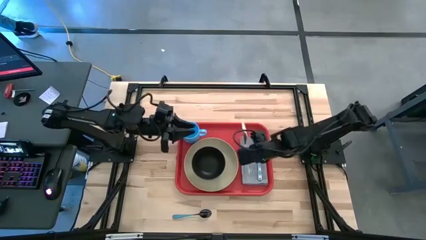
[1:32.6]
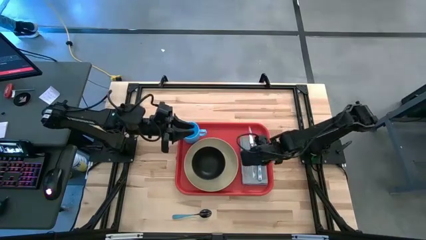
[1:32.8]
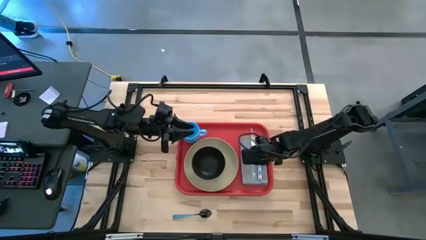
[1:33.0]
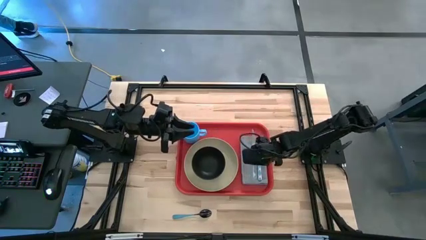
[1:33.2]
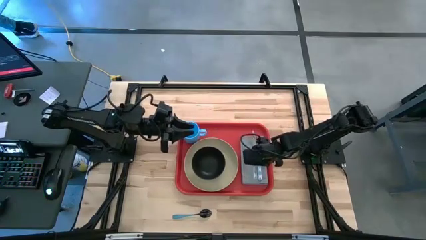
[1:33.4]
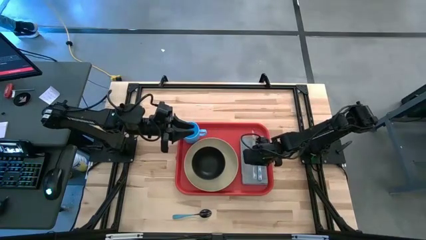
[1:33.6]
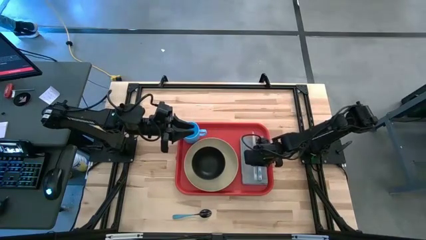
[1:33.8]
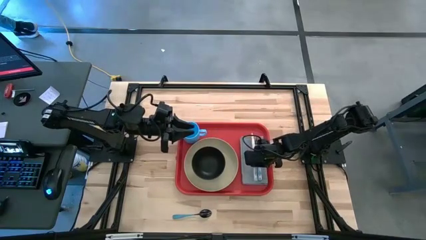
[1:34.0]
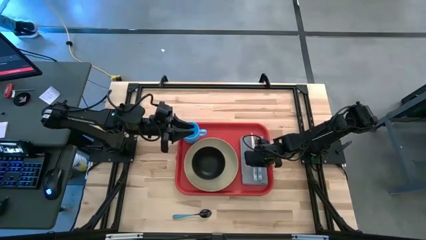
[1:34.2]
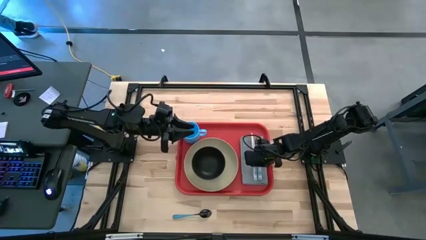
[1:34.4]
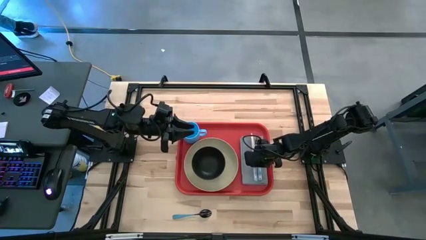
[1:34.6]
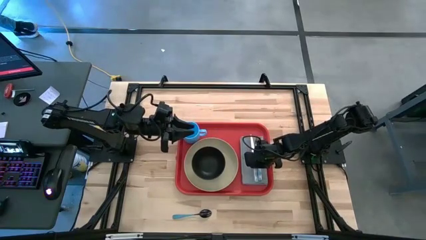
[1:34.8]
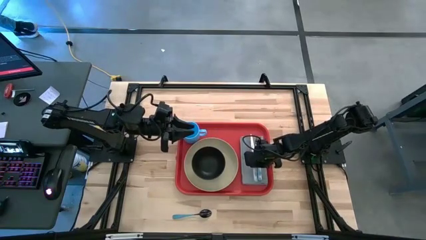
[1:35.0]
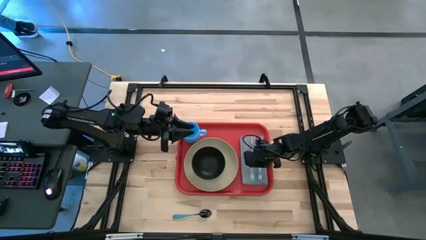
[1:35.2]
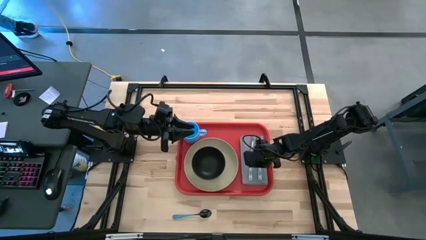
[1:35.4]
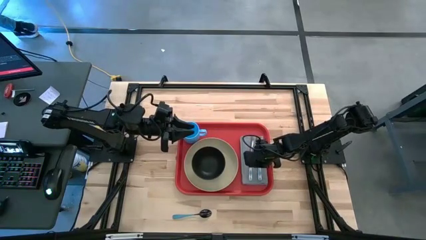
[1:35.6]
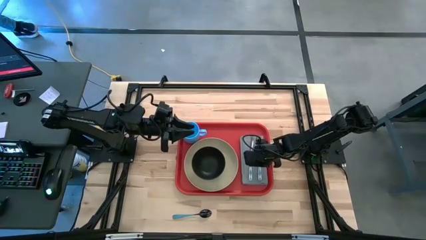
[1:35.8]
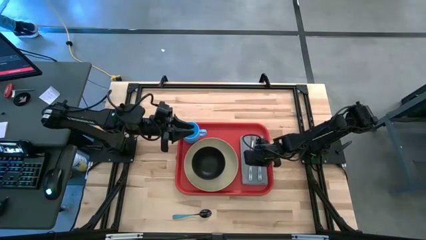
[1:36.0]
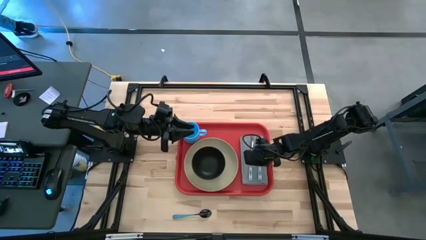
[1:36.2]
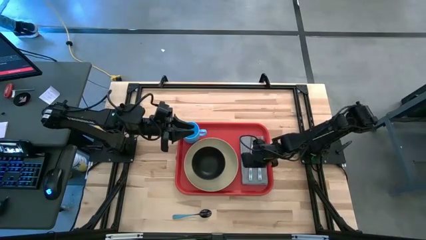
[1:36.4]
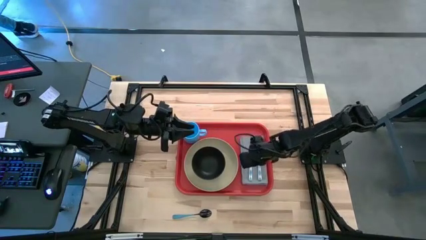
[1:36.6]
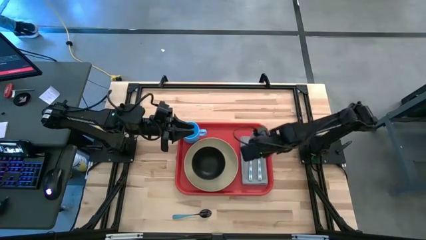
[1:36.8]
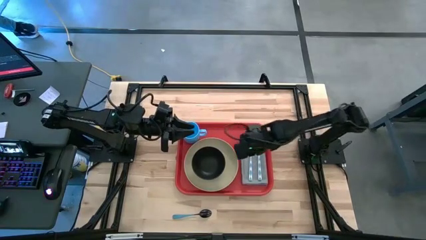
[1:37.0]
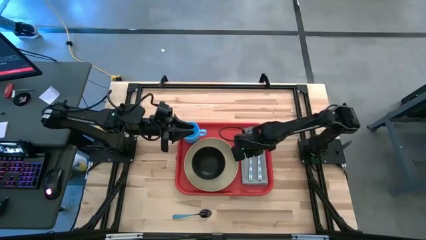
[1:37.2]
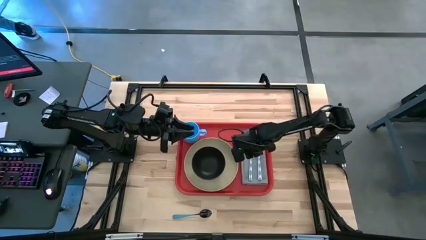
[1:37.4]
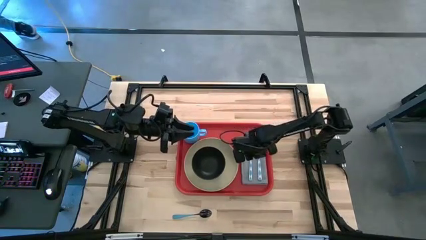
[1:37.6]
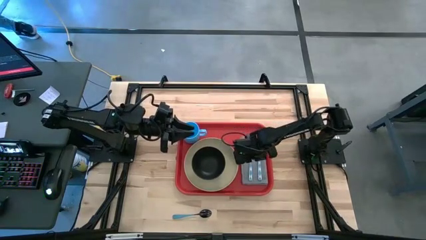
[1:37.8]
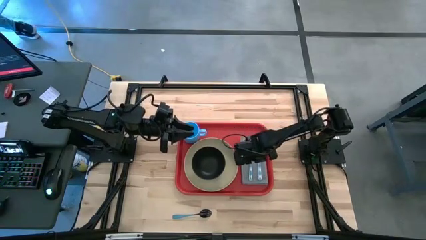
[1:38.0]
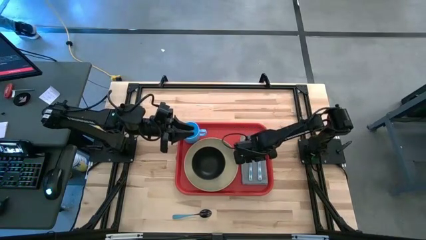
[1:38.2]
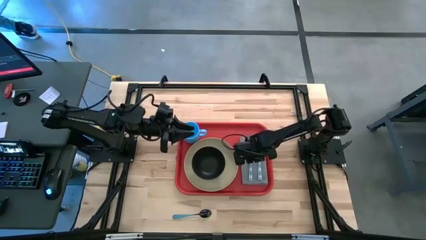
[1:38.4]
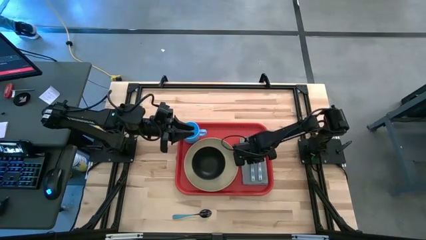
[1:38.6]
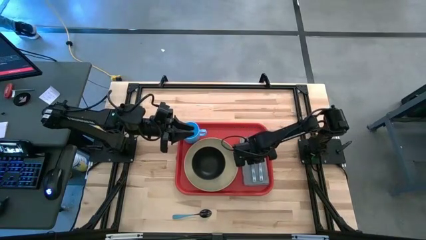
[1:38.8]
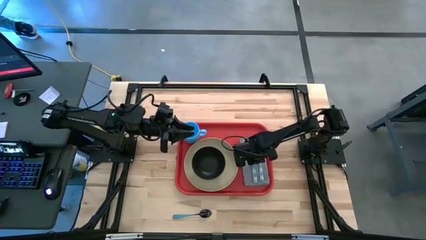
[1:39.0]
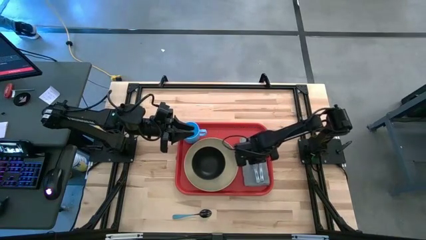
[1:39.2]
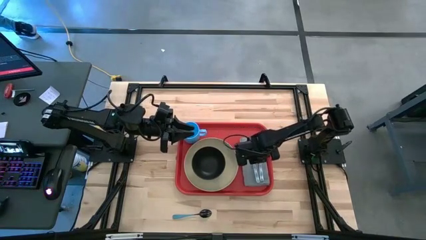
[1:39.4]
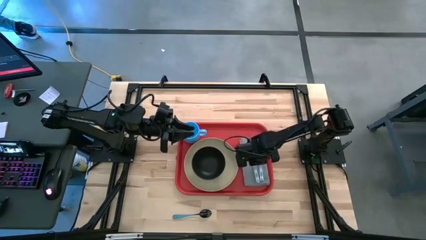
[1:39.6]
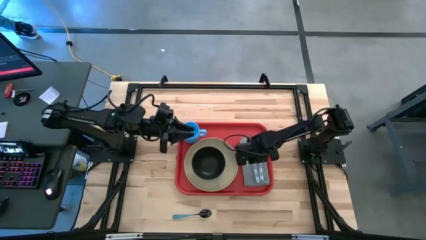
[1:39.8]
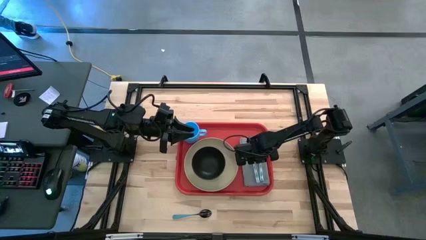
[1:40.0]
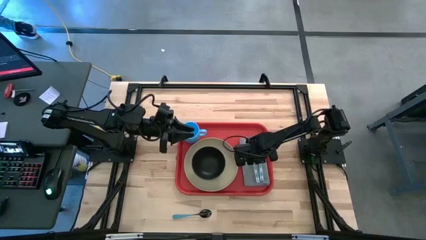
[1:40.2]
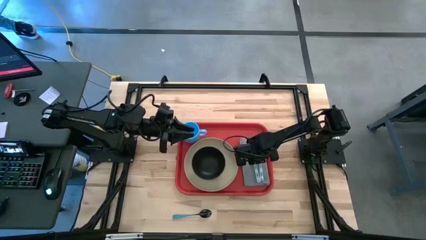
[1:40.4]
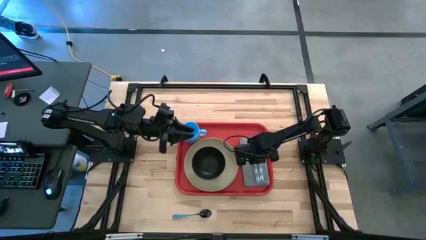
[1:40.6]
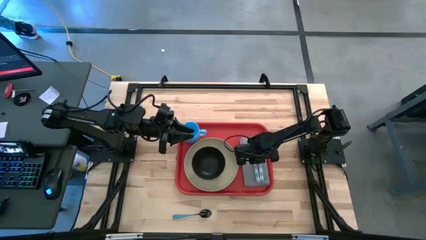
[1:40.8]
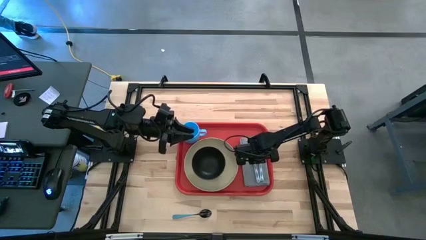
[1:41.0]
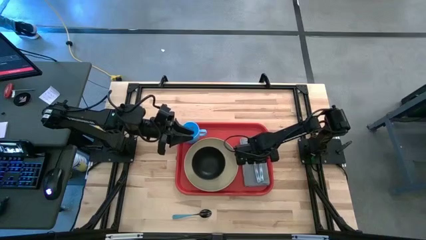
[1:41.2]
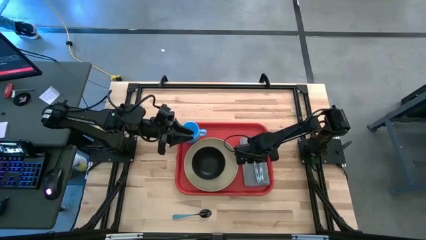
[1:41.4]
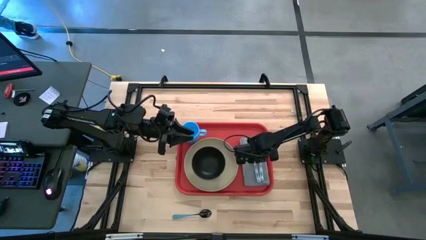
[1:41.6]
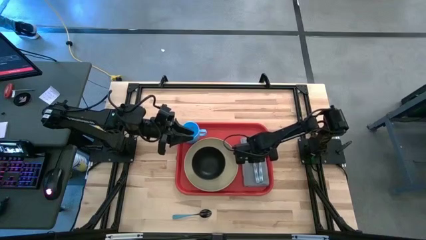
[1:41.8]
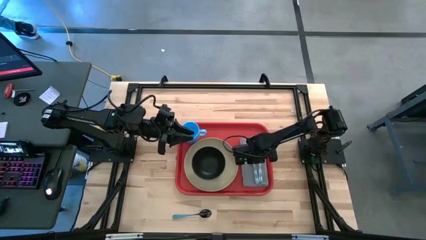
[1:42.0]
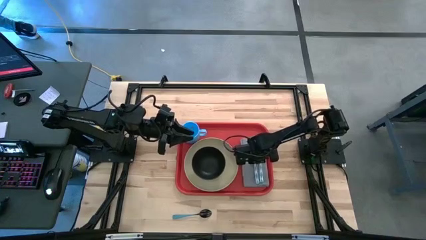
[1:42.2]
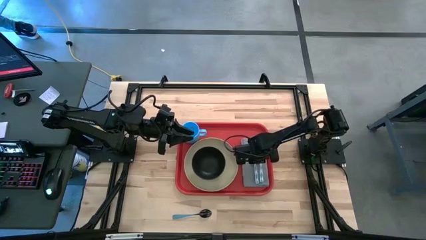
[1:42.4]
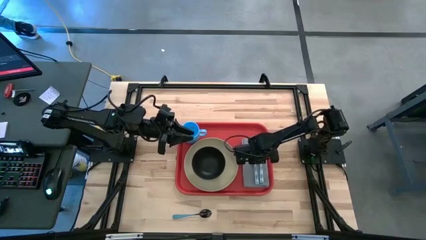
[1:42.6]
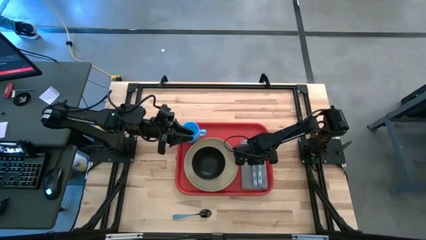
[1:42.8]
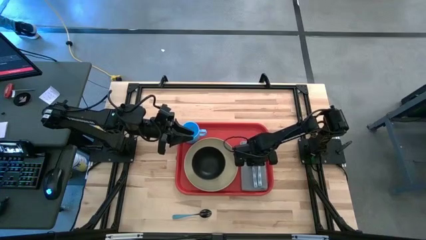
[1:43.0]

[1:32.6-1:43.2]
Task: Set up tray
Put the blue knife on the gray napkin to the left of the blue fork

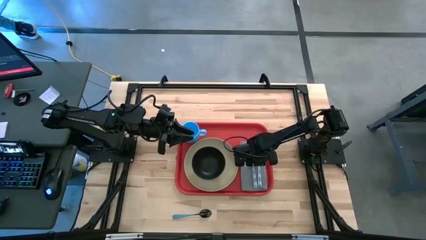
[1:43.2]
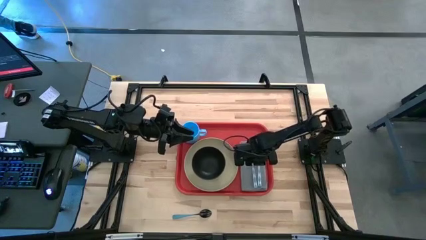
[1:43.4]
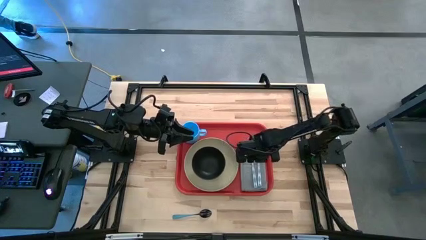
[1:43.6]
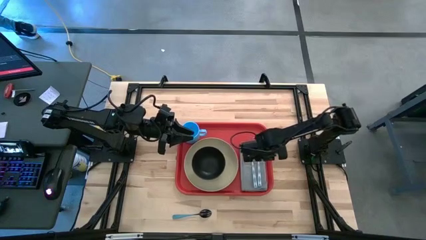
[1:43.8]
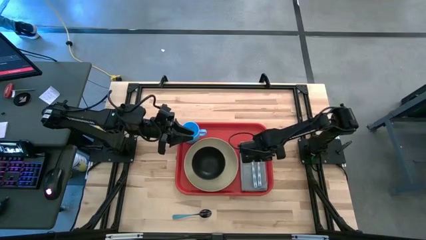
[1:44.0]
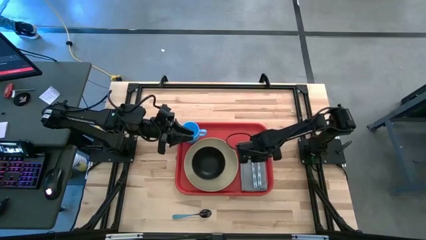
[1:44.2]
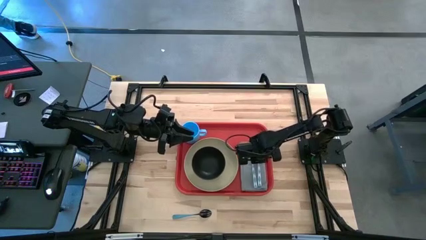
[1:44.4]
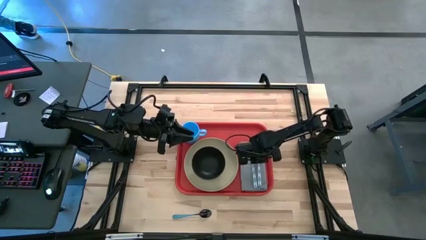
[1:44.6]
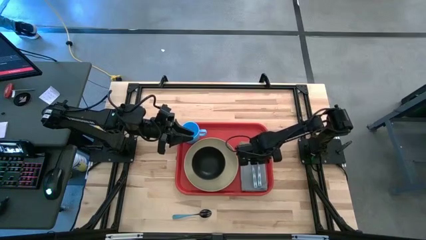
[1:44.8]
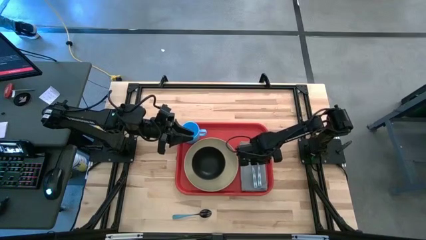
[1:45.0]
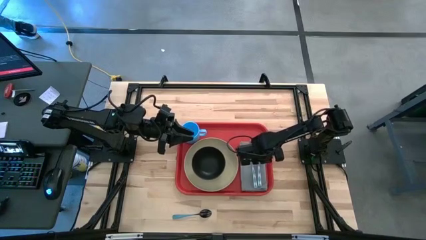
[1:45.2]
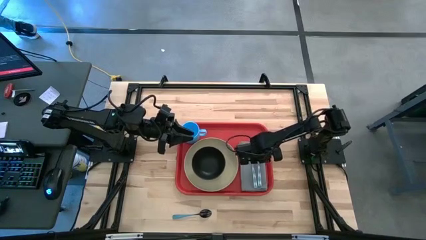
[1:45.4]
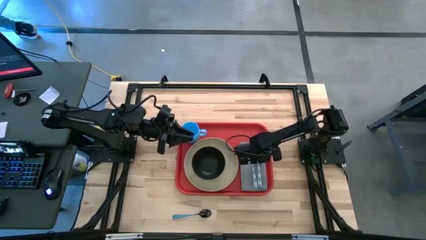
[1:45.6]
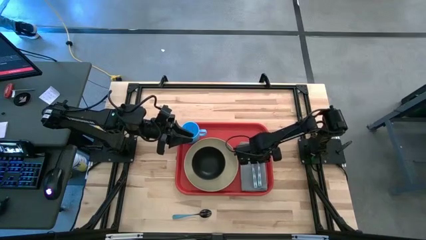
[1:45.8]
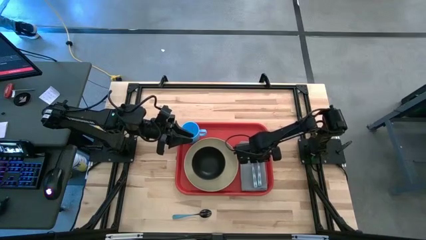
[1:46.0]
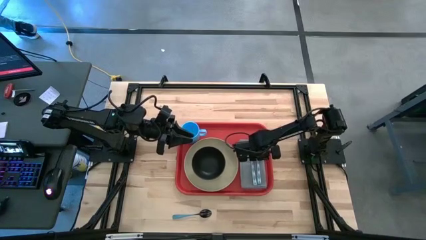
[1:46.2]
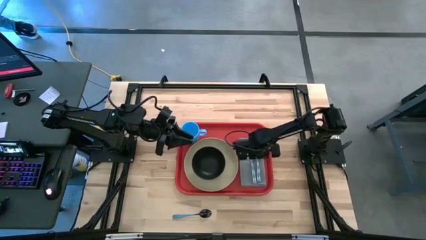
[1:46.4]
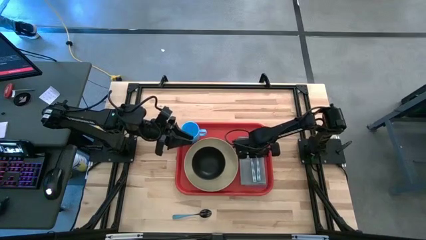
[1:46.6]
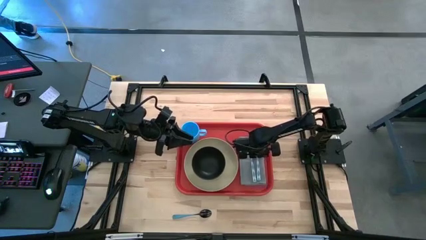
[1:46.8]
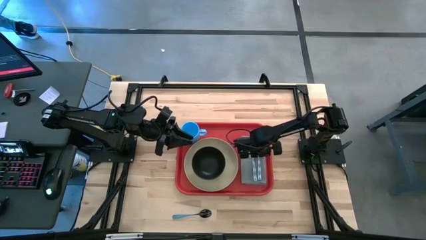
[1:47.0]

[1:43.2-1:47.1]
Adjust the gray napkin
